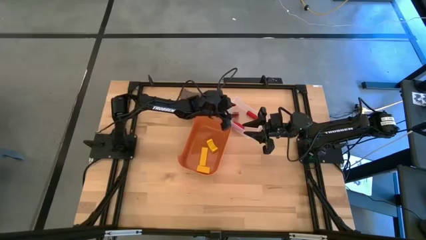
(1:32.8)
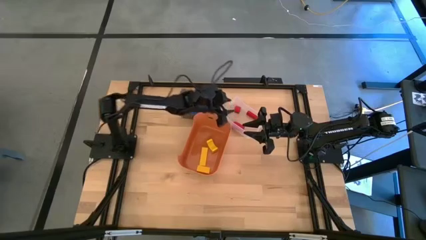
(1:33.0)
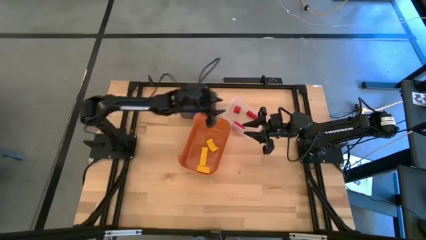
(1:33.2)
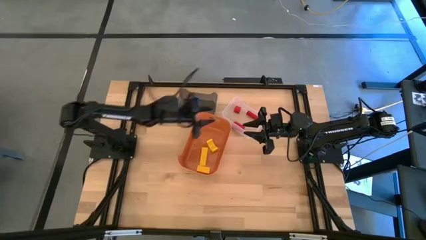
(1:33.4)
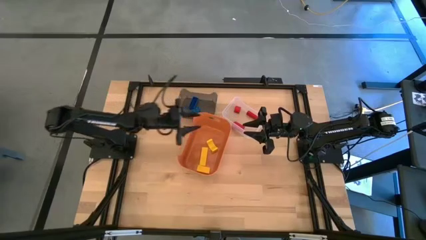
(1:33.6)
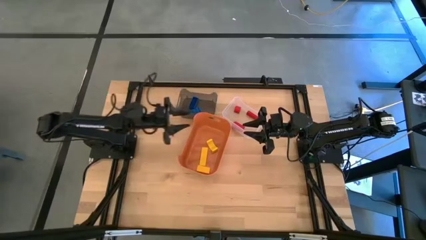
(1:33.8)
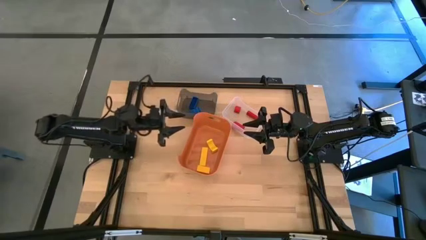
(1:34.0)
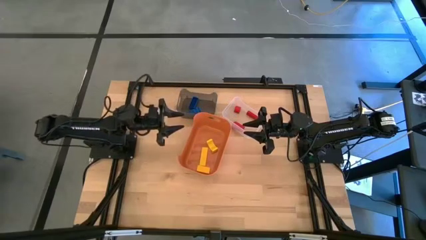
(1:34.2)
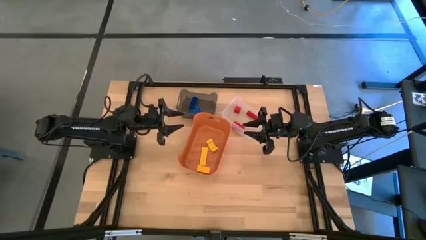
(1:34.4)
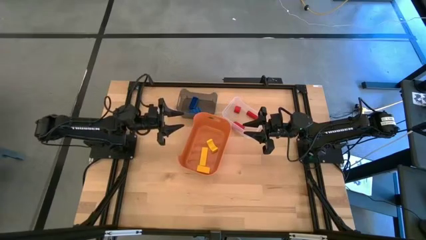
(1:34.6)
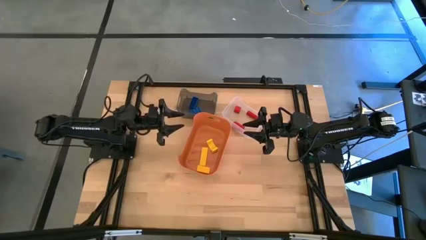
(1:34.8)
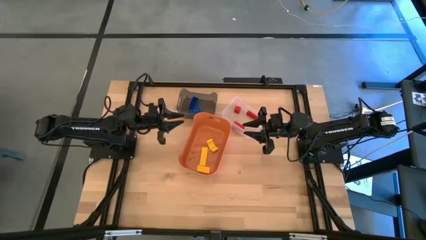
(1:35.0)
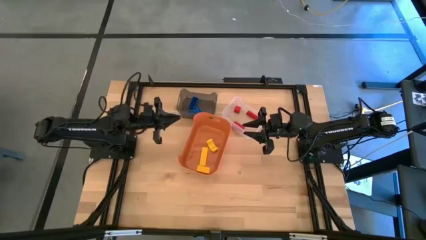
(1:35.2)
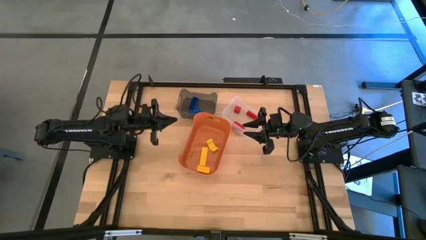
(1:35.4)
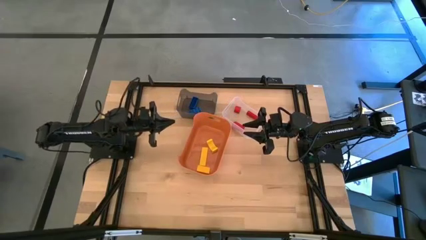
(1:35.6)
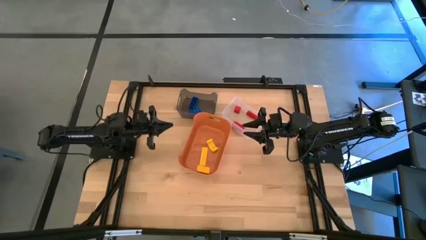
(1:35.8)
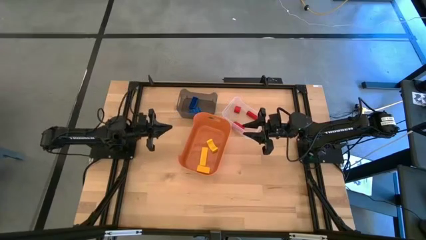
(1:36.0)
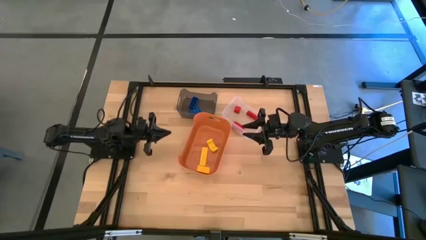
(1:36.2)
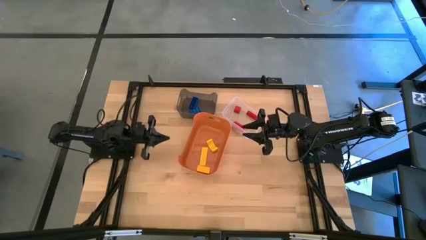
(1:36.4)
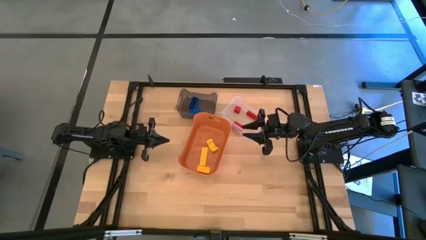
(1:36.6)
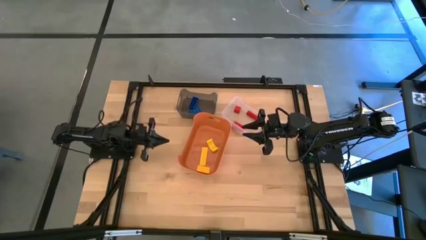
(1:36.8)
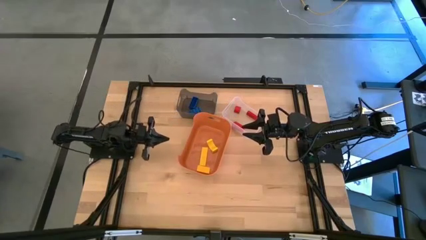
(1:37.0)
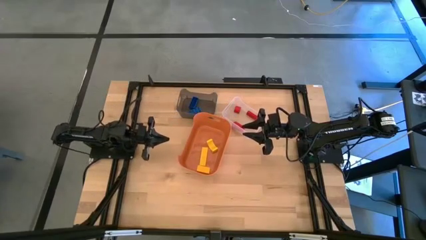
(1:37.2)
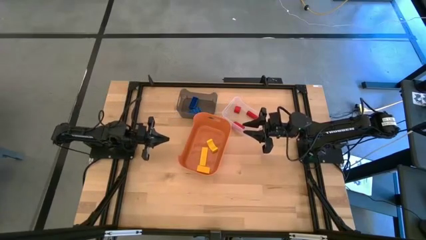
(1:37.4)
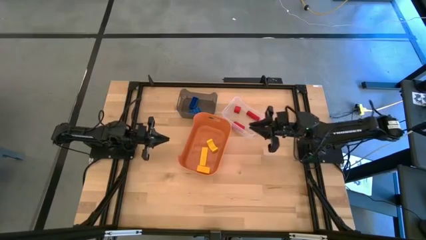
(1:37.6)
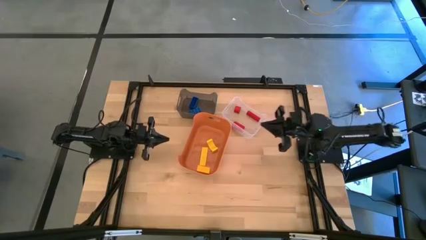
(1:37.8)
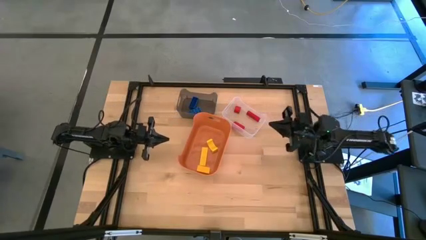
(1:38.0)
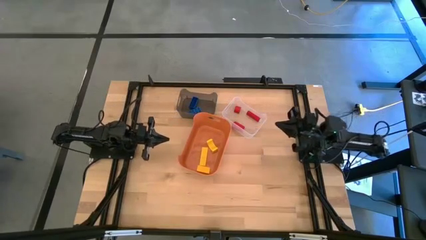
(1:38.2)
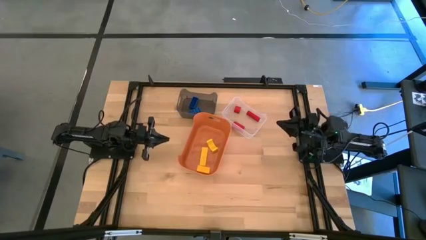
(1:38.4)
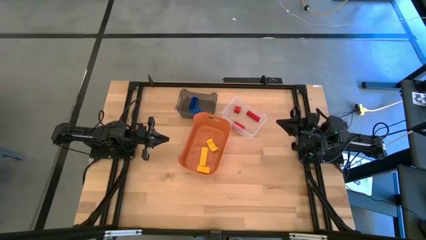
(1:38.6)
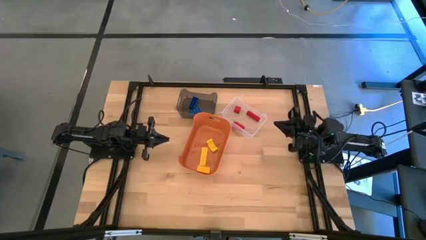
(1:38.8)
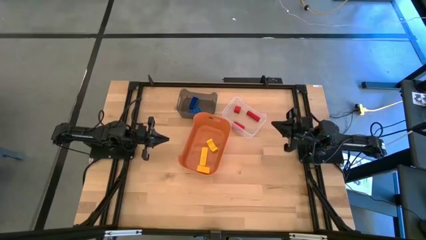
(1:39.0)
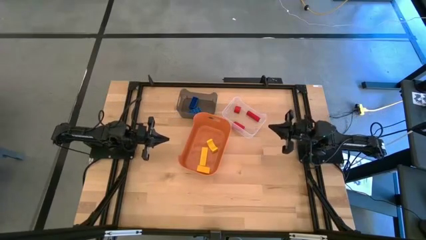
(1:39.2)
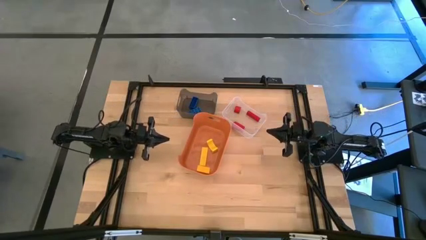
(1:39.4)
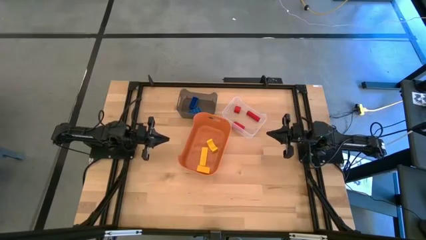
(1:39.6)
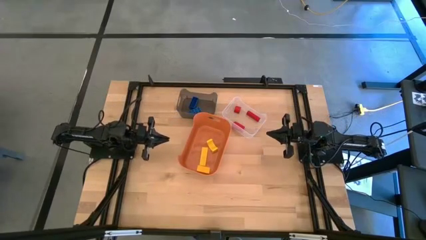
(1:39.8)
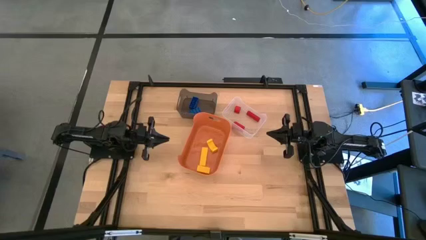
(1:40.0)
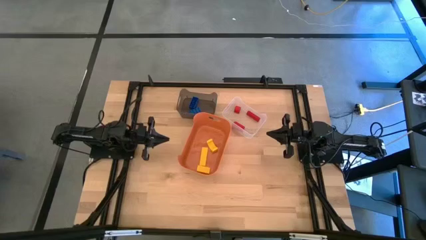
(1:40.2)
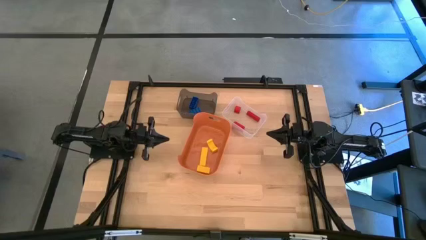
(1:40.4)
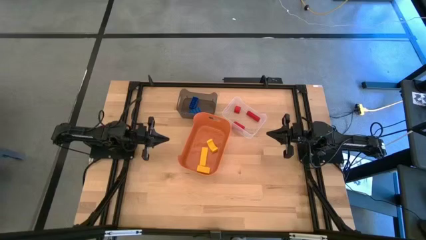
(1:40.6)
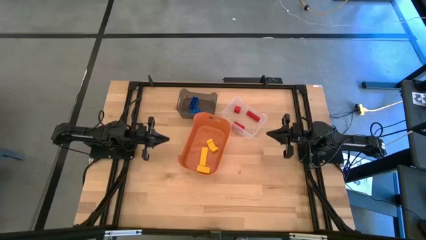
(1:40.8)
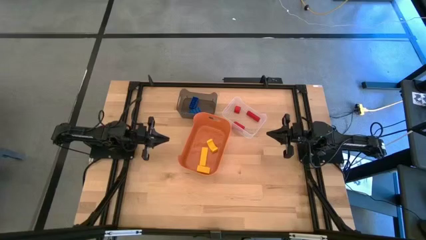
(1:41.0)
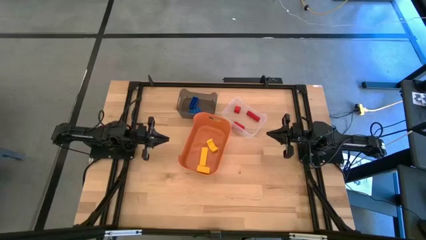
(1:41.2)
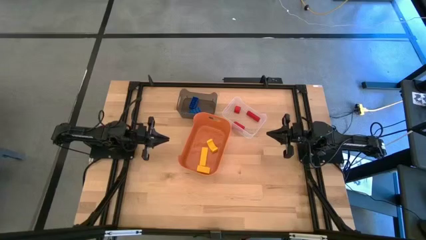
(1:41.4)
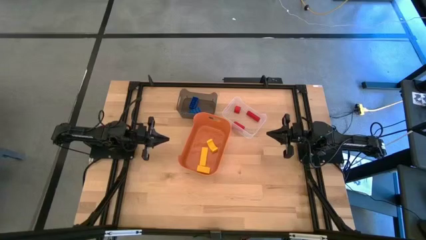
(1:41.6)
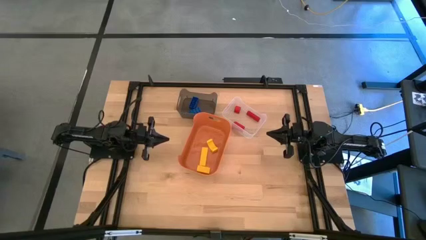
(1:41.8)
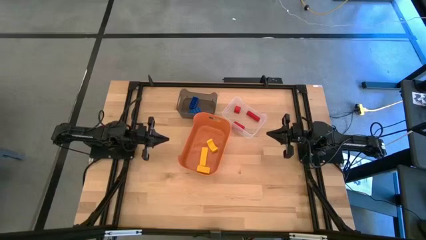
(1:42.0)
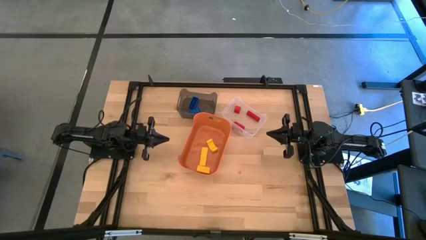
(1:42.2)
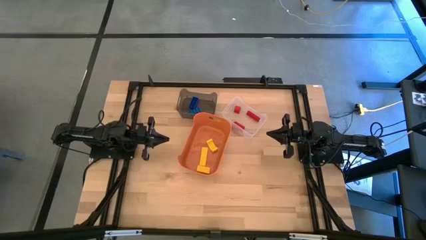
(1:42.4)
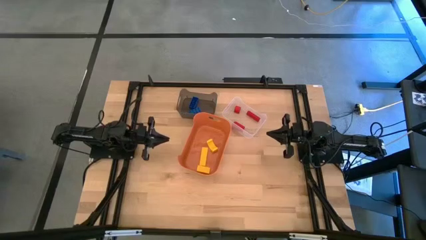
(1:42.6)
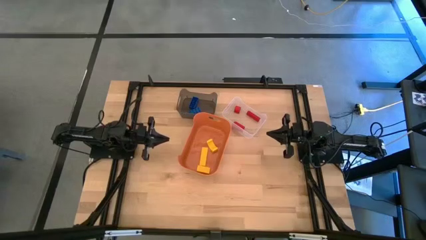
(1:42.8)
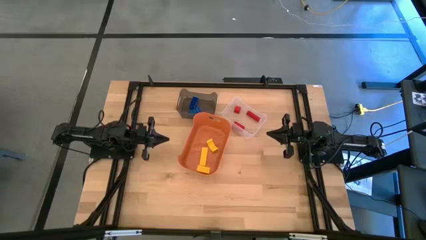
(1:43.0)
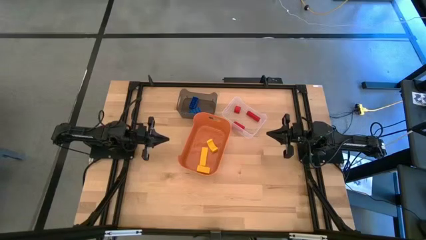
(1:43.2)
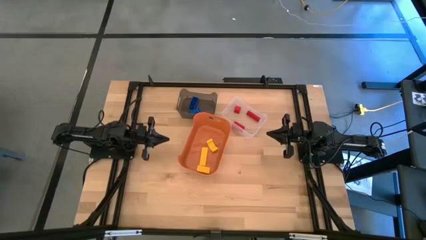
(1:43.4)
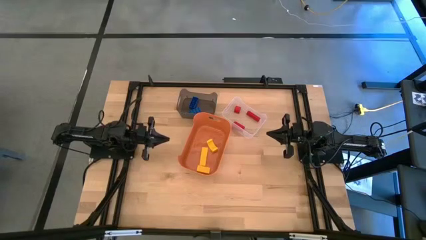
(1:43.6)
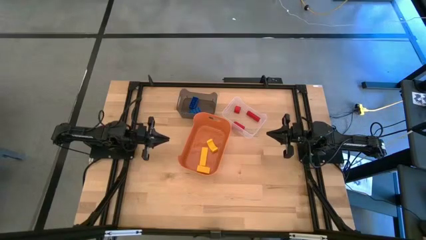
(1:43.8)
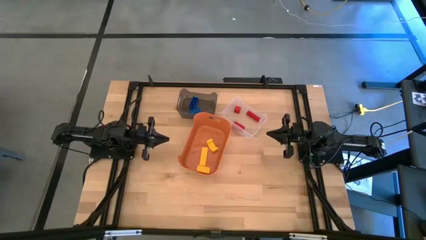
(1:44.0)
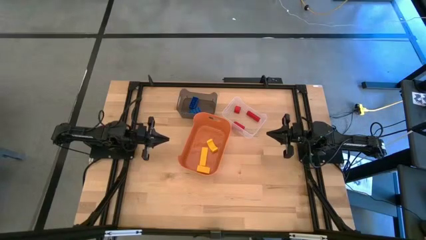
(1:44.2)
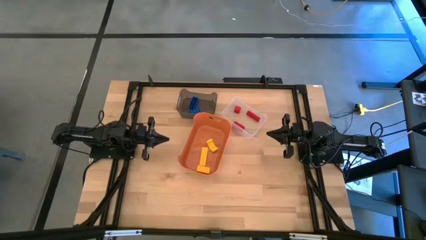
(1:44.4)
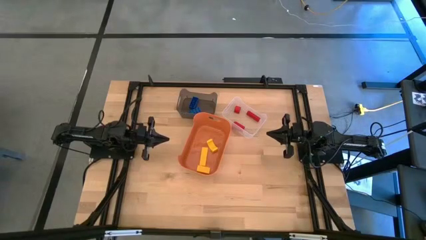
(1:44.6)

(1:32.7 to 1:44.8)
Task: Sort & place blocks by color
Return to Home Position

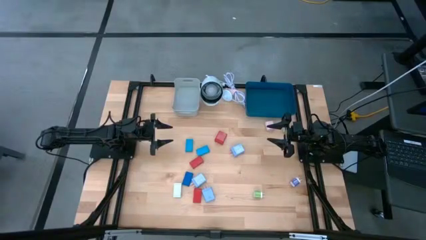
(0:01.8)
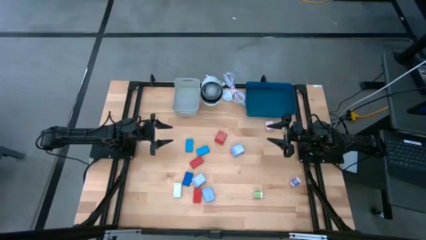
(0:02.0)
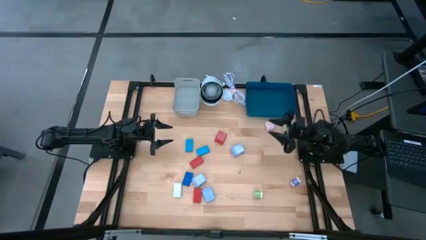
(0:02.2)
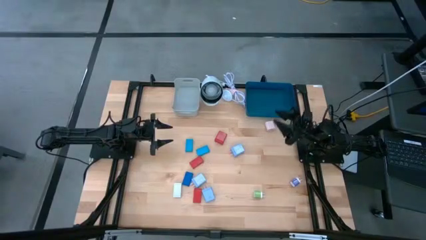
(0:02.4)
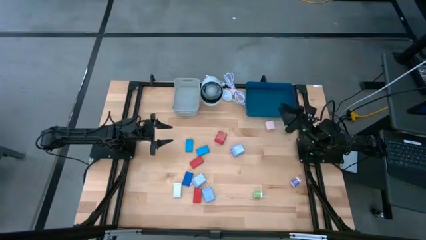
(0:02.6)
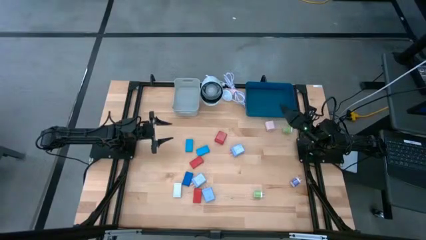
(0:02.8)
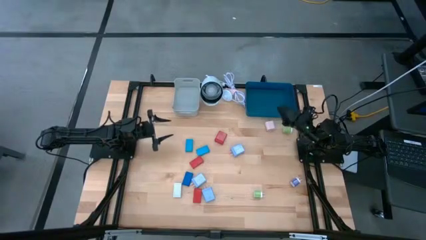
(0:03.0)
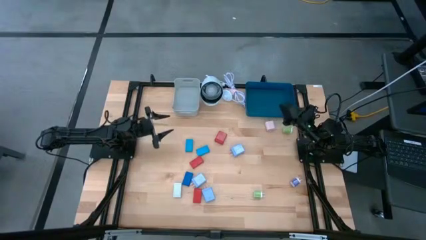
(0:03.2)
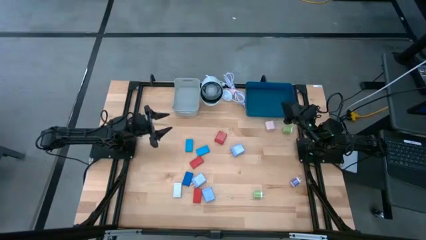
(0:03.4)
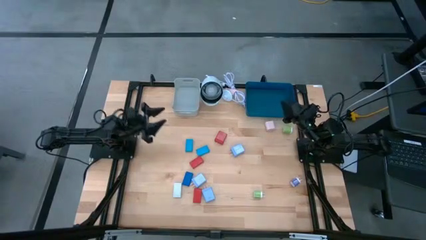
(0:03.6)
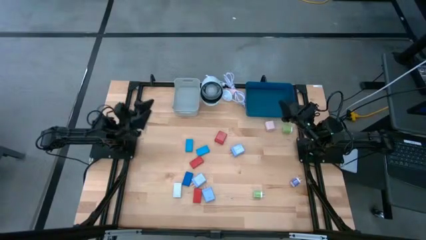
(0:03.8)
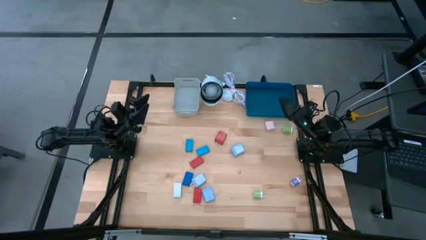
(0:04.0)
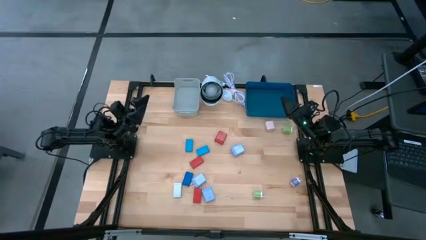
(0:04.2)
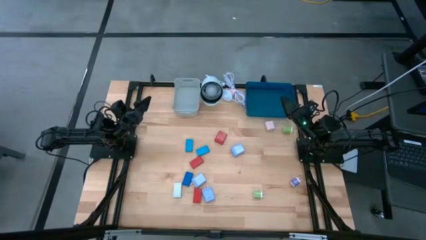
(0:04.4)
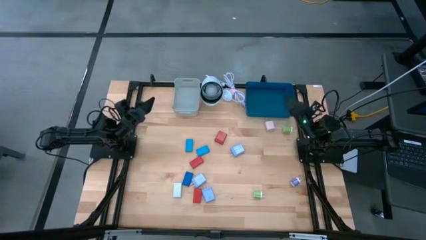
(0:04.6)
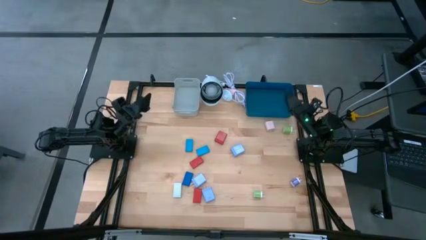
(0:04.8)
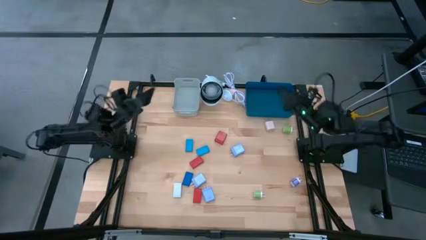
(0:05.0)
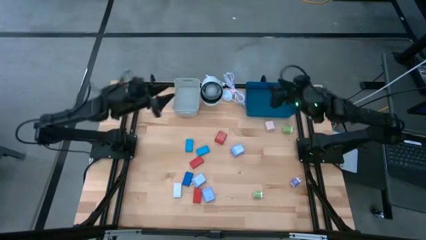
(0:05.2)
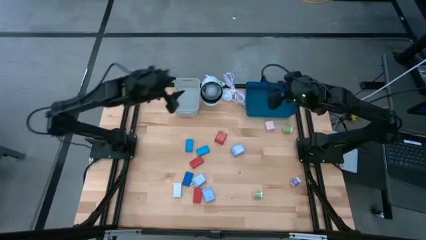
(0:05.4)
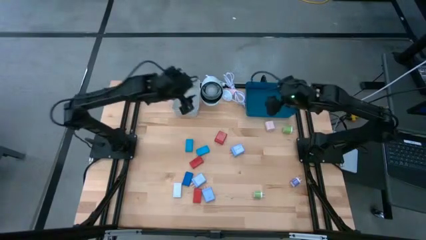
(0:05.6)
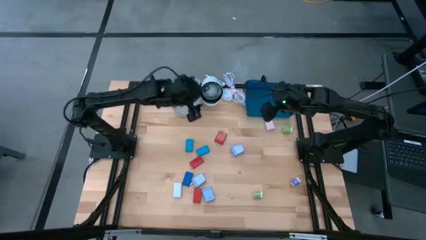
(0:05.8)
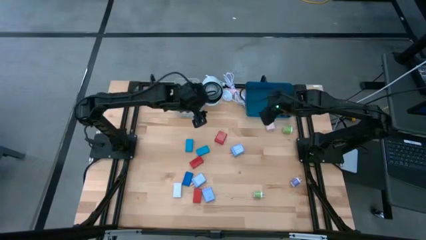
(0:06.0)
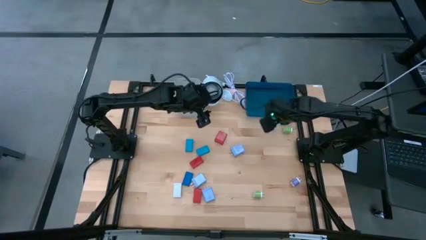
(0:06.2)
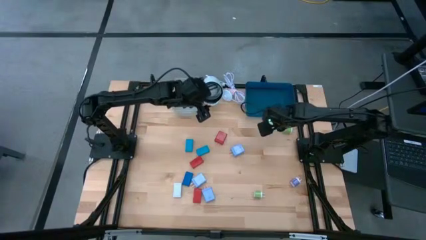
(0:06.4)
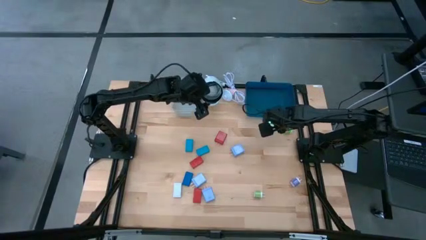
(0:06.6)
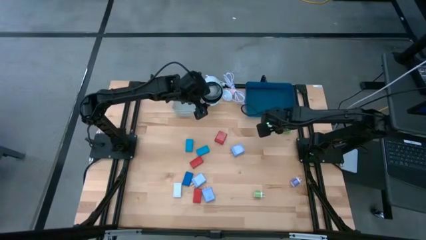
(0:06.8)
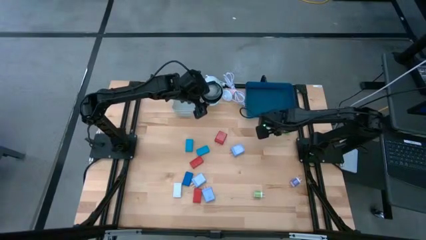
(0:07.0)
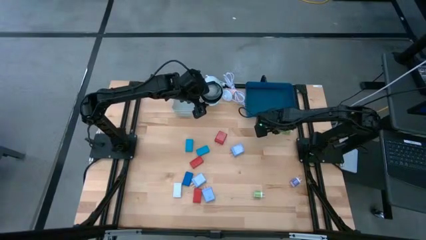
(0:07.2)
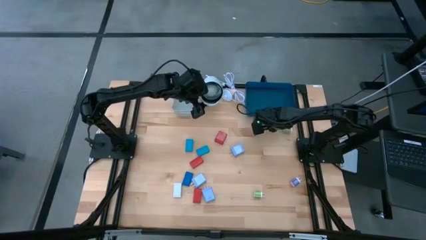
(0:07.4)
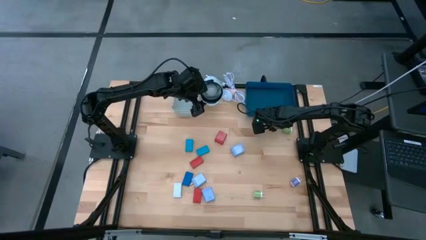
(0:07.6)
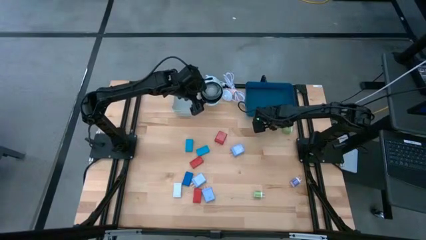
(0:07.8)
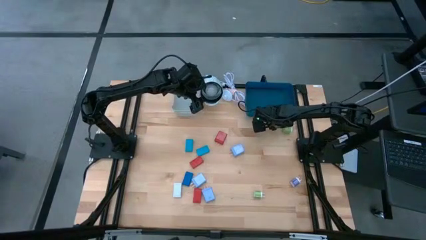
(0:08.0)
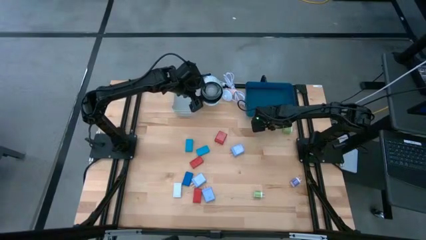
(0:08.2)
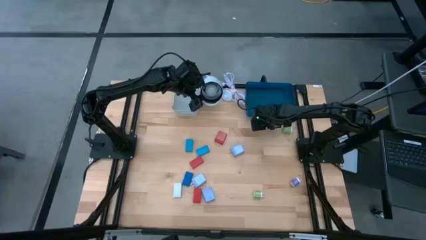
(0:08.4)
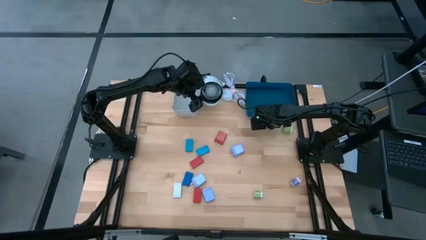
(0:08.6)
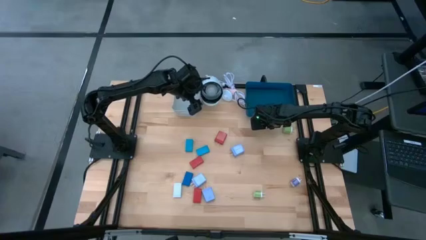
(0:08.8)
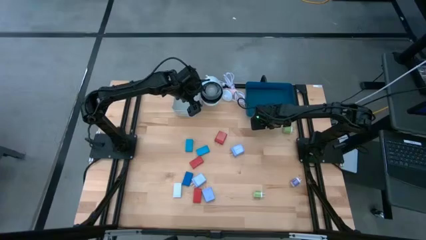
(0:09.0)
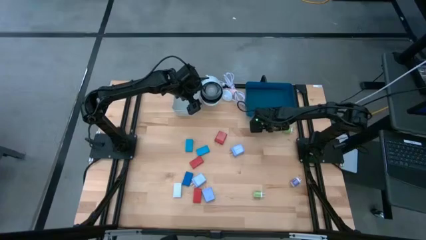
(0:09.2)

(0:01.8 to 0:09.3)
Task: Pick & Place Office items
Put the light pink charger adapter into the blue bin
